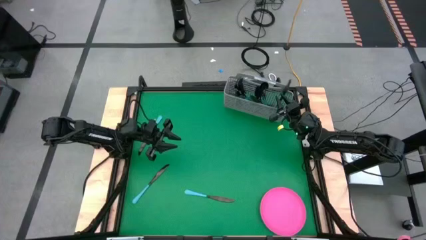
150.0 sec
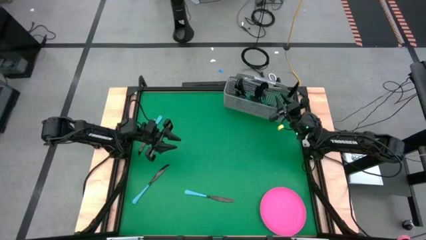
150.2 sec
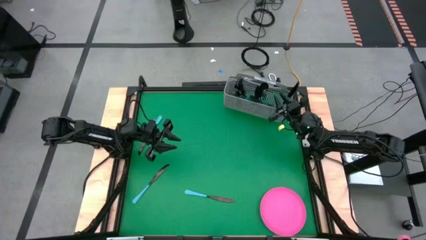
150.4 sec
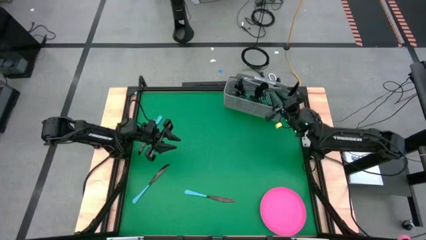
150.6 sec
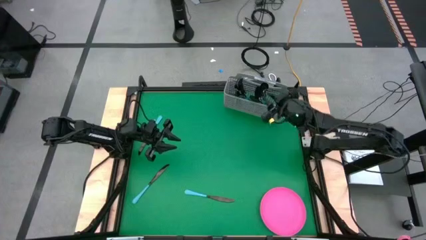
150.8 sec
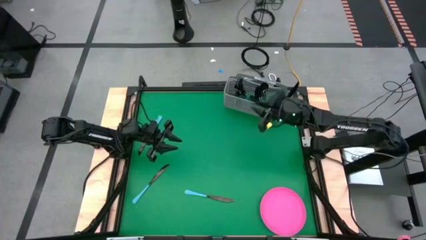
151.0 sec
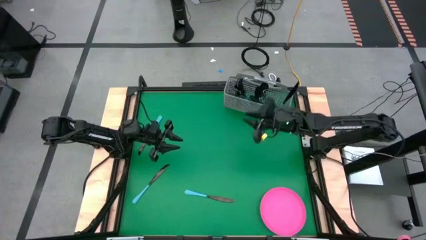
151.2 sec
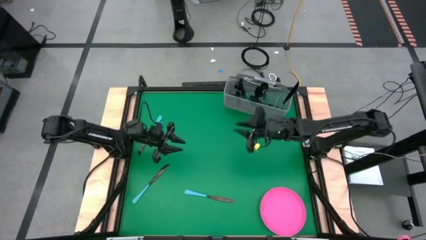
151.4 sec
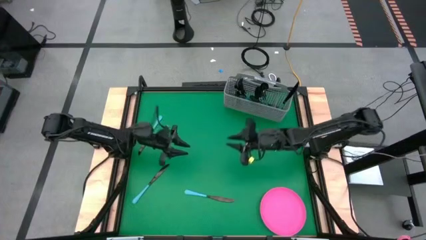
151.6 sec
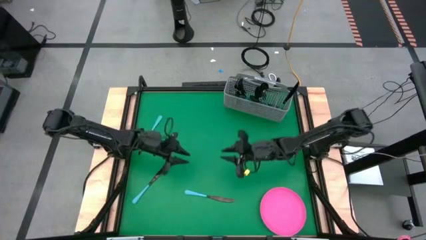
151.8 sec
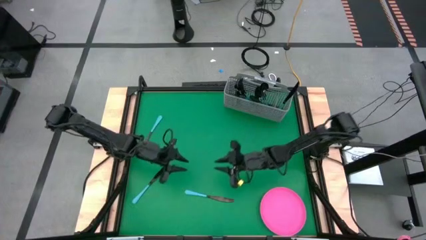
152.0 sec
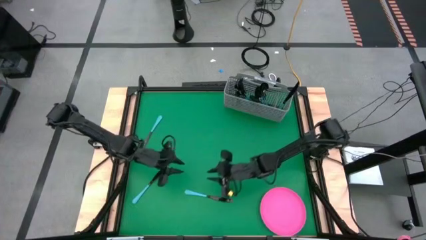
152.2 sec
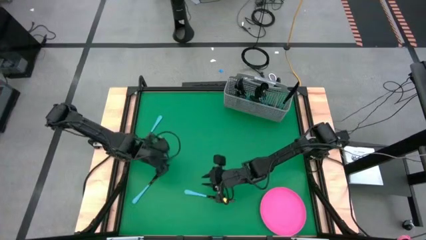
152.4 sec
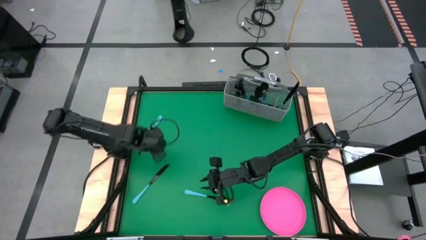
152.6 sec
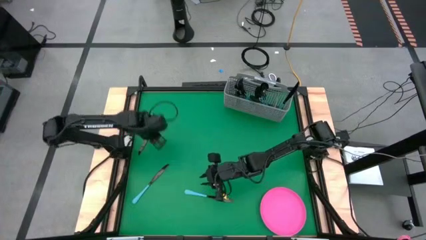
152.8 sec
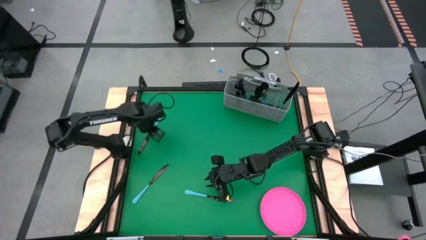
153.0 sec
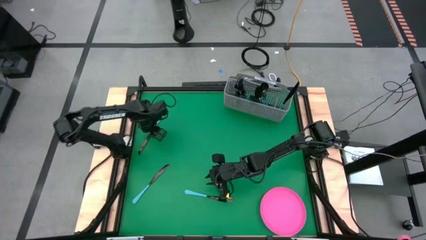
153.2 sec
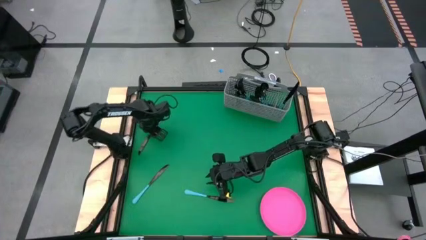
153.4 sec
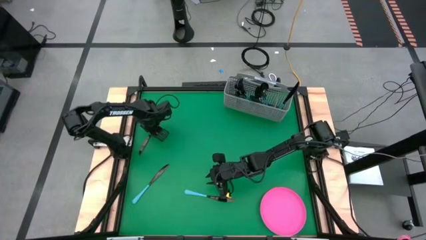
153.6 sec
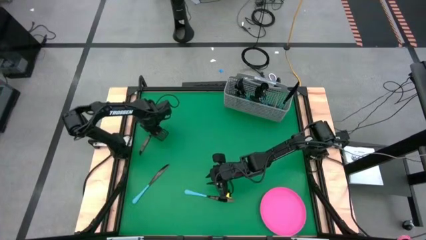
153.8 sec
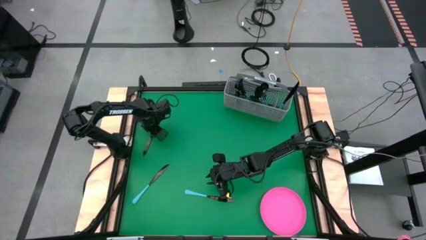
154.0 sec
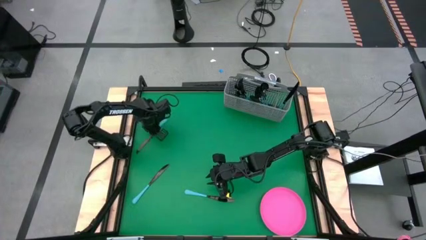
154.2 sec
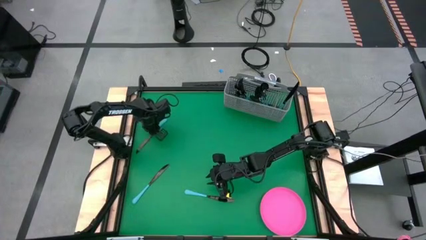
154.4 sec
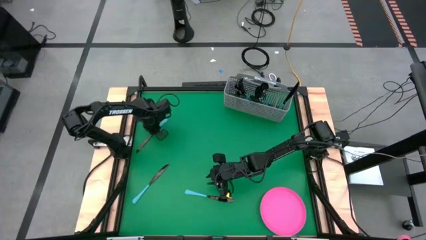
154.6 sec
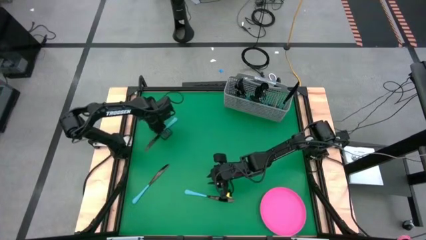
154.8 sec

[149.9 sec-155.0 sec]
Task: Sort silverware
Put the blue table knife into the silverware basket

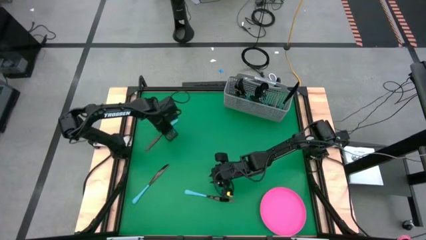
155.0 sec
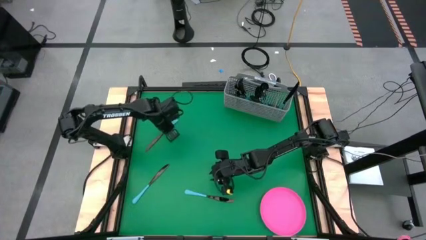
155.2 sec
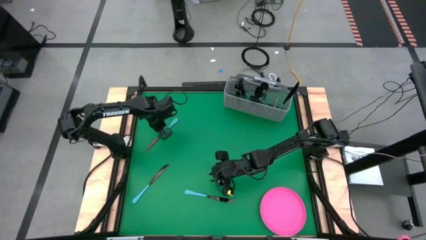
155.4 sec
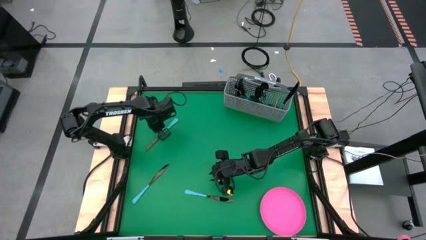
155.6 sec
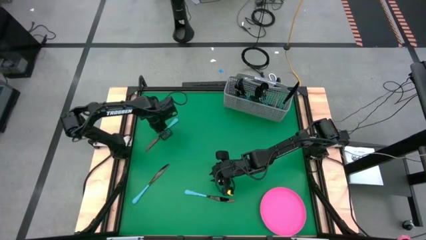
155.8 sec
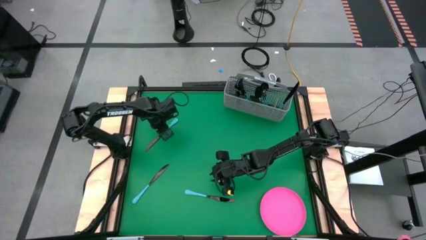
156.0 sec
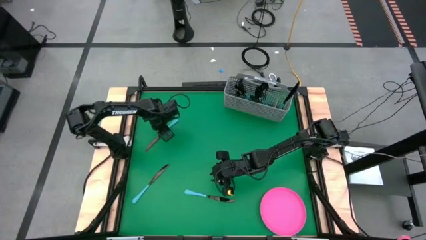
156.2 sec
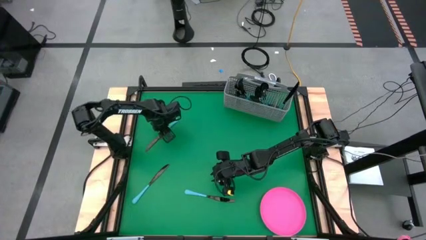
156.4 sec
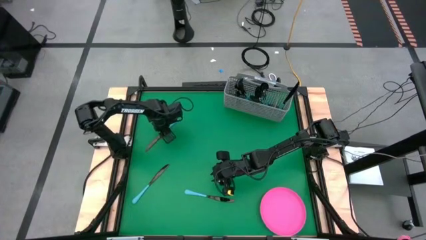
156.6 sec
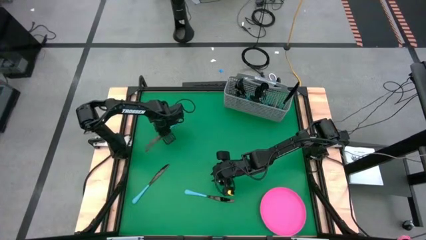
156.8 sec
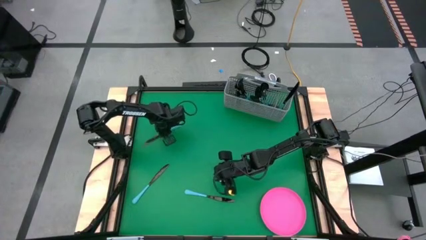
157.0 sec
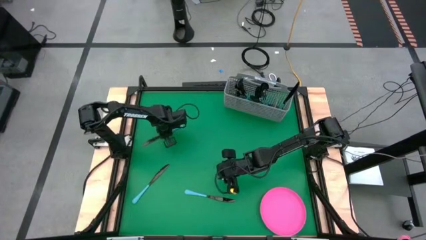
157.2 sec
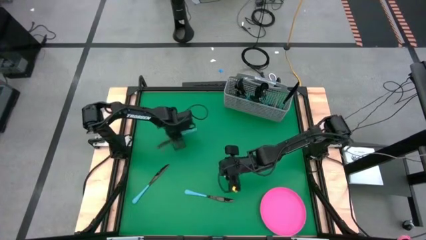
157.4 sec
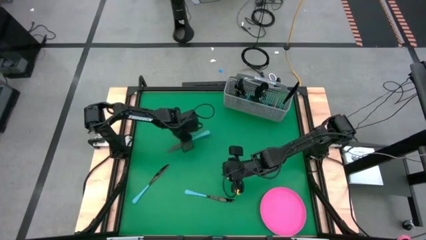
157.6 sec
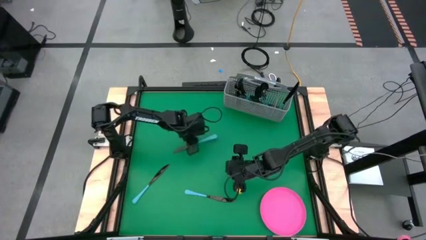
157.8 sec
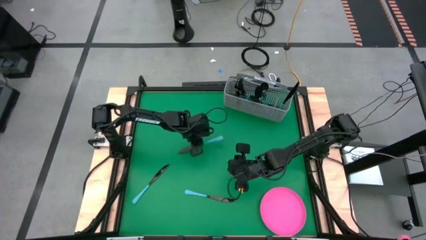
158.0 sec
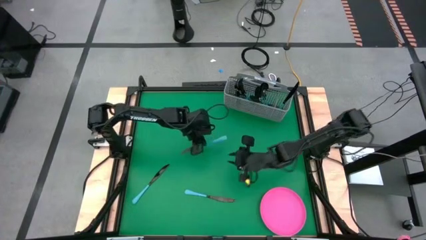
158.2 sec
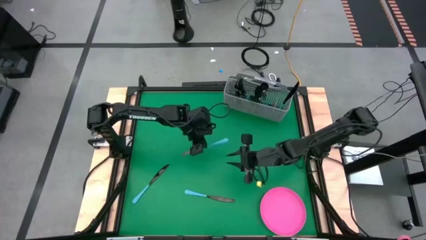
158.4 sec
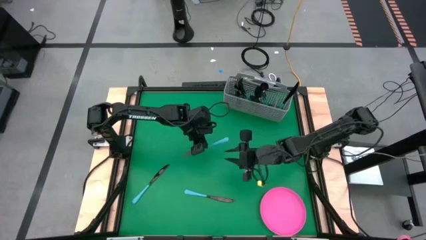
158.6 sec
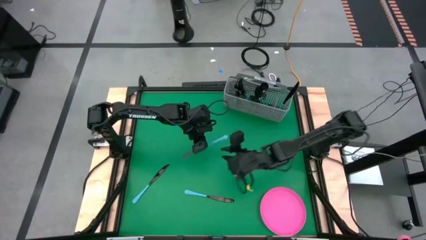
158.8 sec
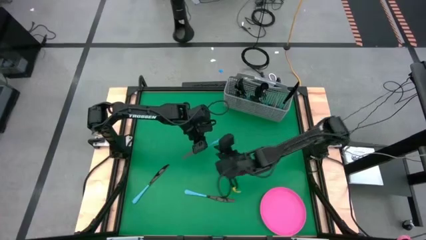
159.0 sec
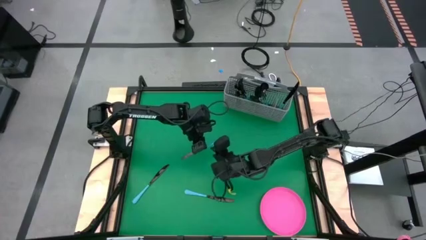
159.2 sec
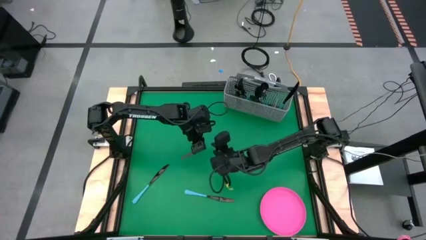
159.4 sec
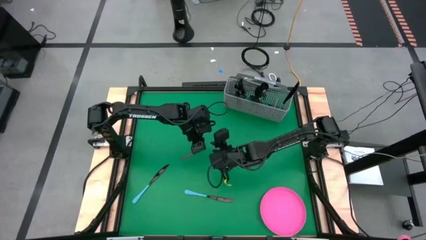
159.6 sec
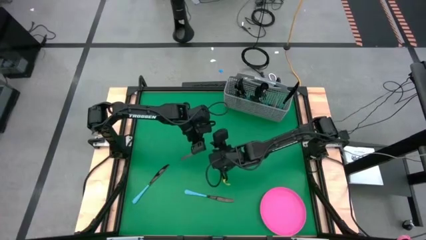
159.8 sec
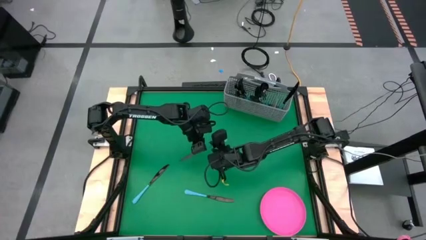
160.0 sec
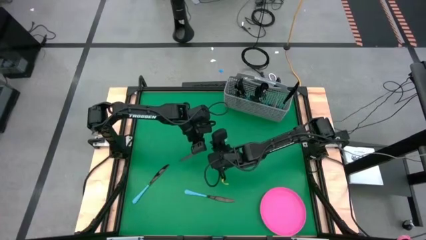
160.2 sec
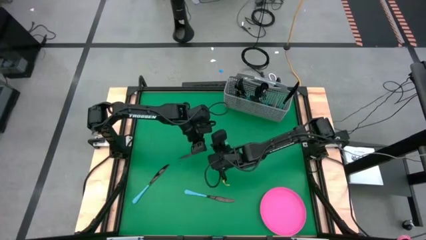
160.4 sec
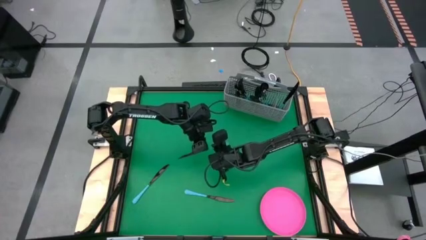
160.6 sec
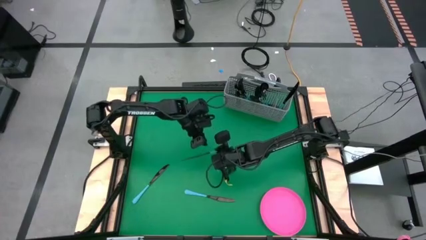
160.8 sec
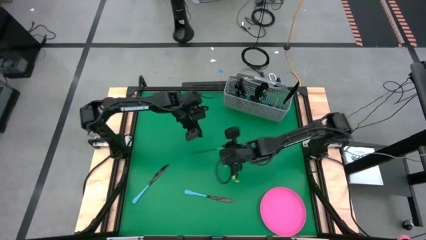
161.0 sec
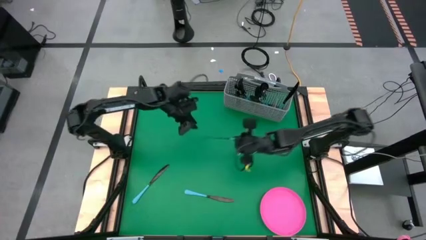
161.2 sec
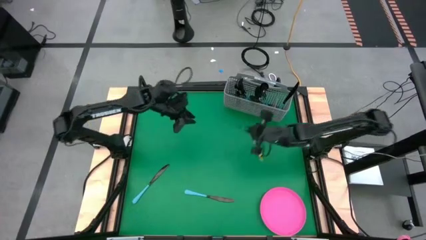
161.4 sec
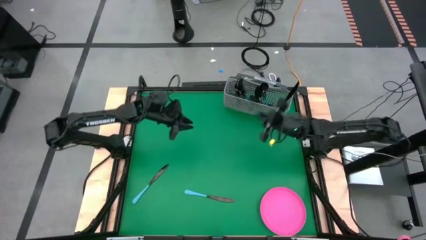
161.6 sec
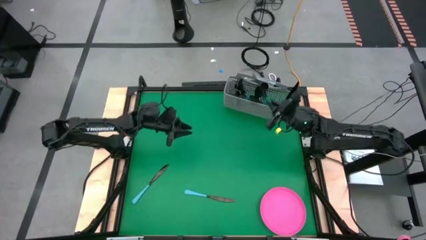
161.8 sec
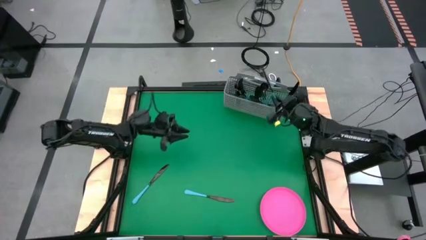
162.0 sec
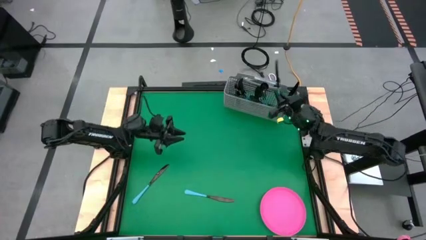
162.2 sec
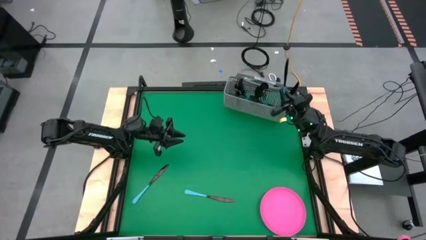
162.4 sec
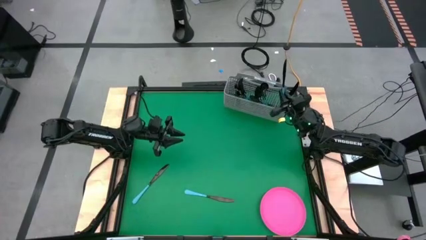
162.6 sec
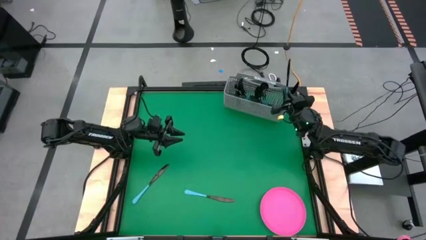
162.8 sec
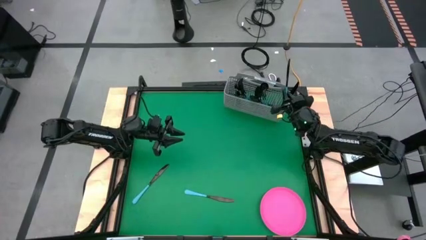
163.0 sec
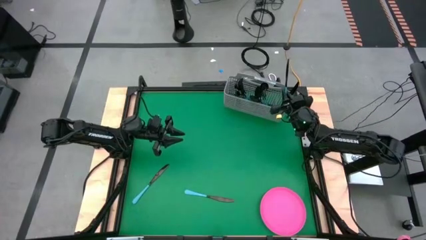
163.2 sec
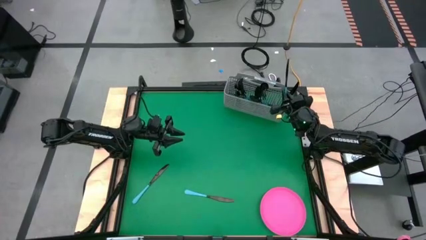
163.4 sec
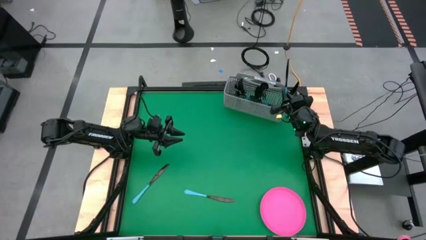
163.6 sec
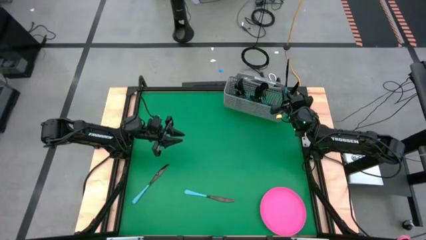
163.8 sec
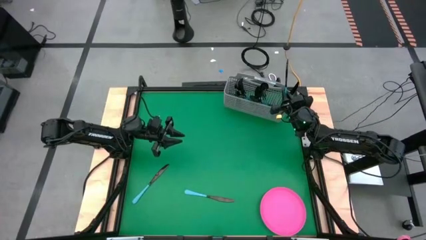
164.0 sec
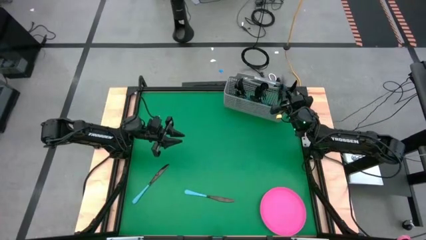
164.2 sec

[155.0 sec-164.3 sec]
Put the blue table knife into the silverware basket

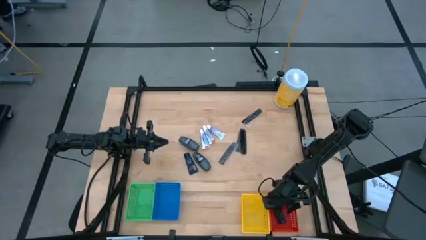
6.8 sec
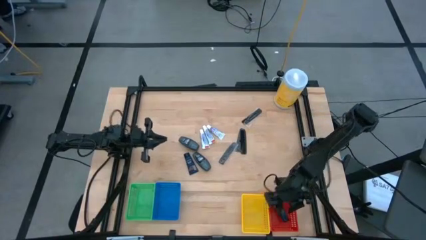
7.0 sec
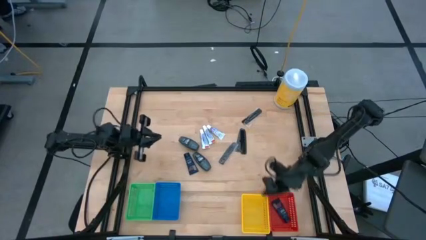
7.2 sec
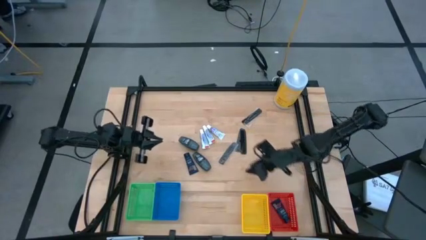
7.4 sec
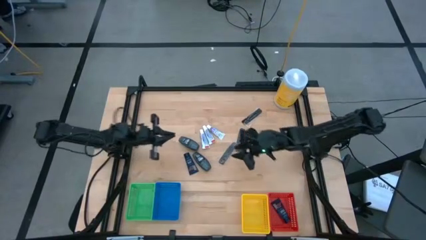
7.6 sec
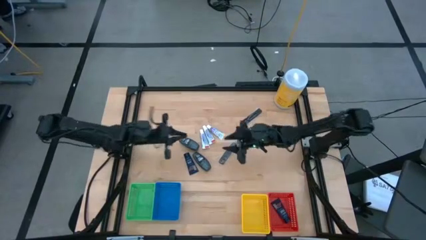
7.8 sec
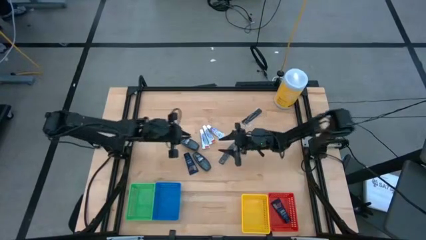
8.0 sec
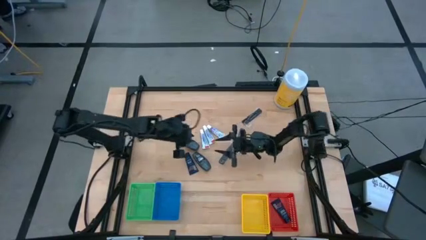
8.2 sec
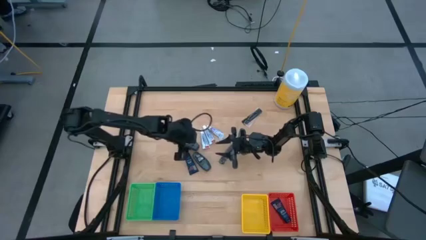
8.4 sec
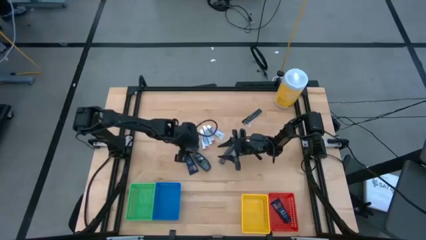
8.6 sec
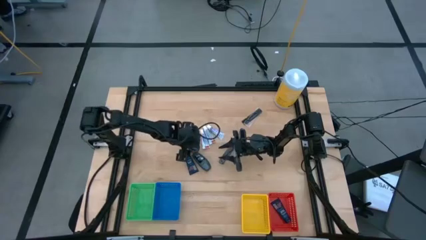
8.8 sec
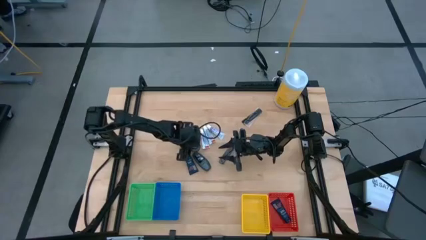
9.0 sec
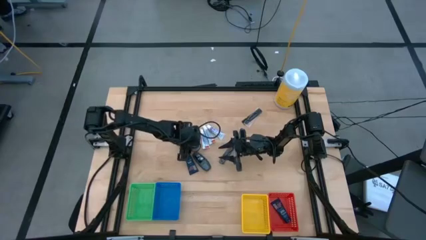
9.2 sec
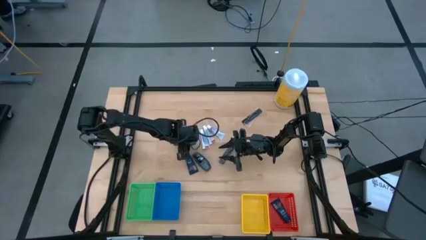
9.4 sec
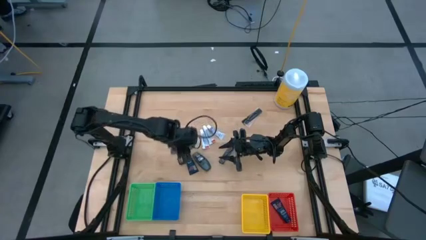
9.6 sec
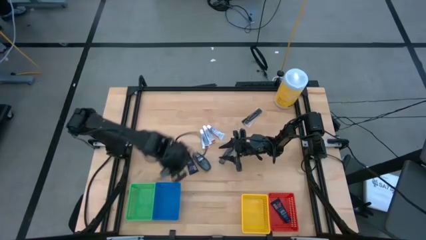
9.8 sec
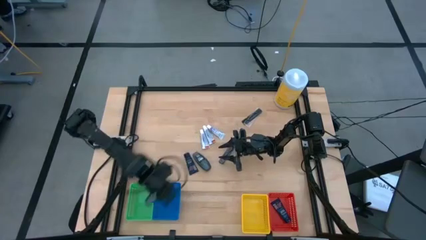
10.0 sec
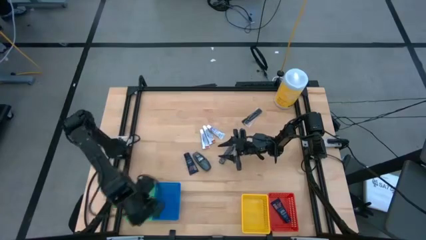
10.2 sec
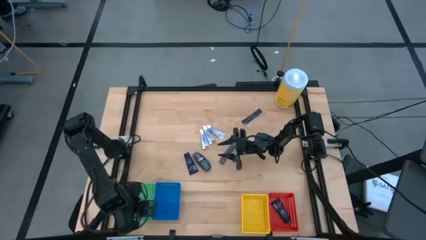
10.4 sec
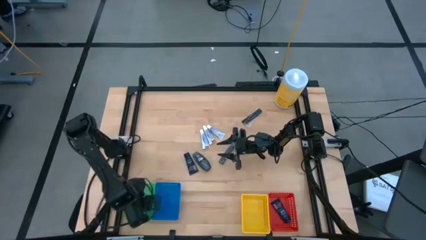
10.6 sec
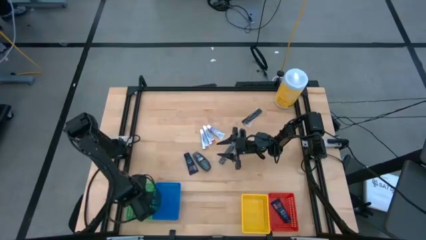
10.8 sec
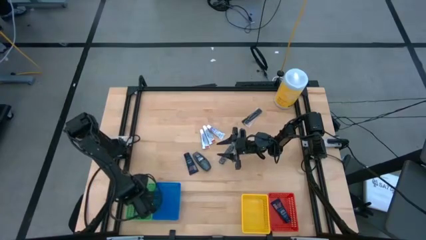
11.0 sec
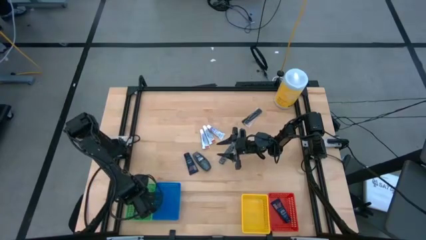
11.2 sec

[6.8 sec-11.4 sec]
Task: Pick & Place Travel size toiletries
Put the black deodorant into the green bin
